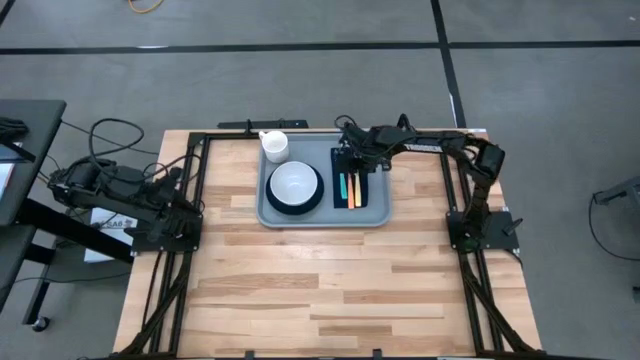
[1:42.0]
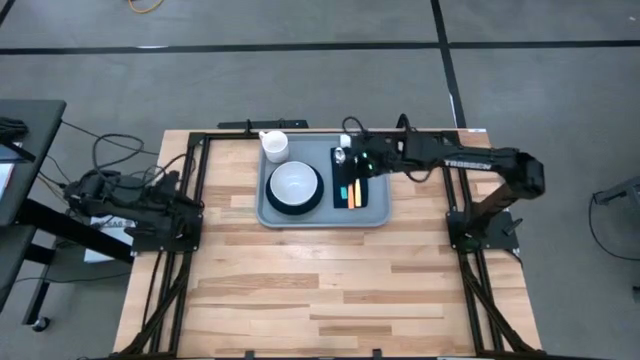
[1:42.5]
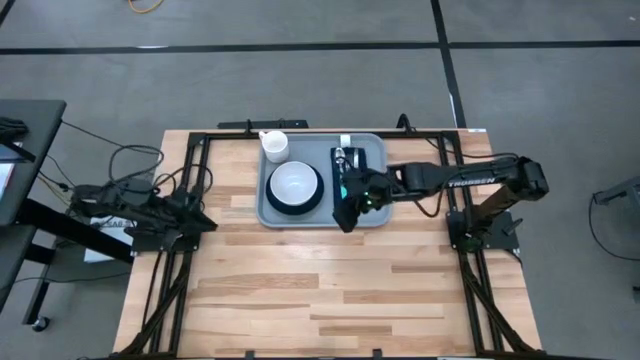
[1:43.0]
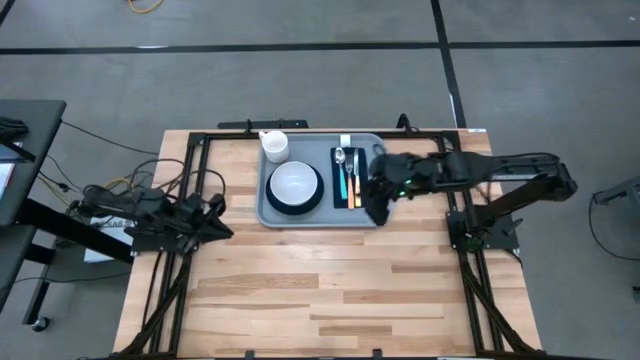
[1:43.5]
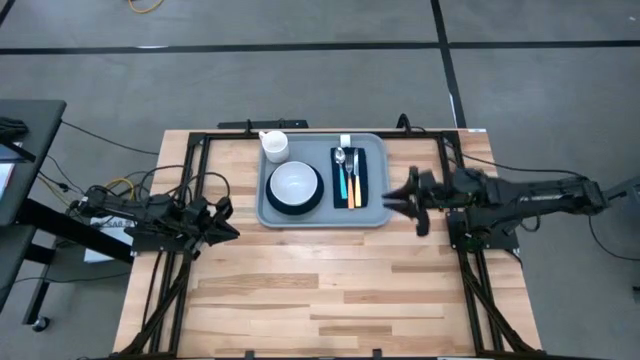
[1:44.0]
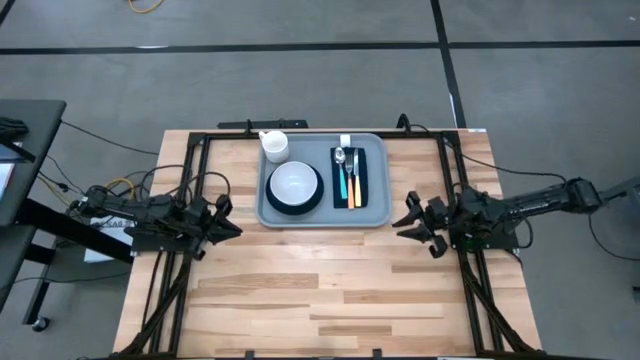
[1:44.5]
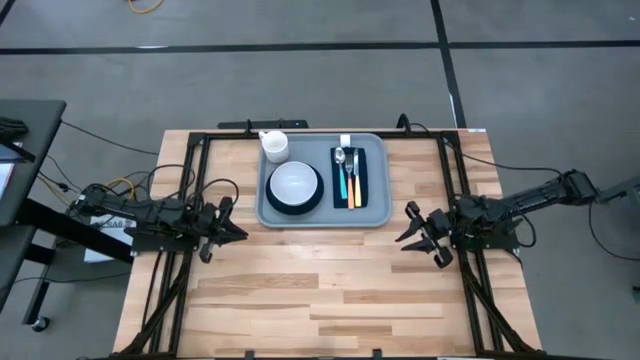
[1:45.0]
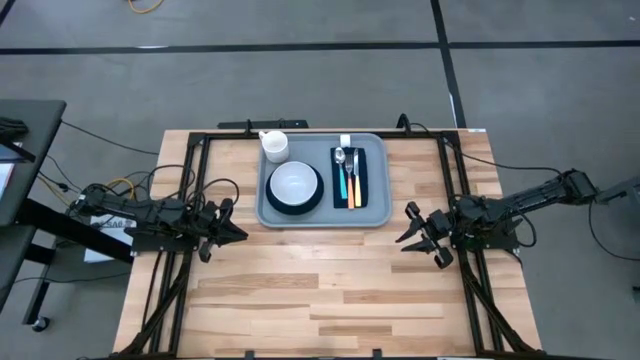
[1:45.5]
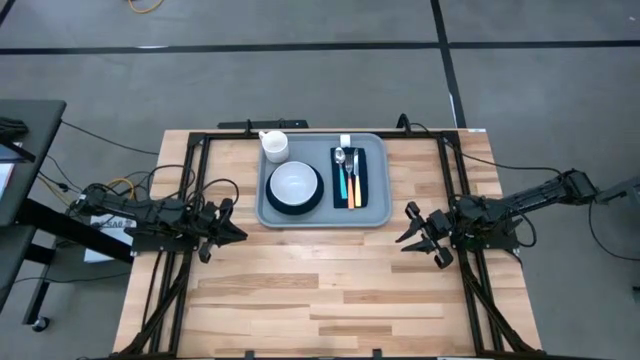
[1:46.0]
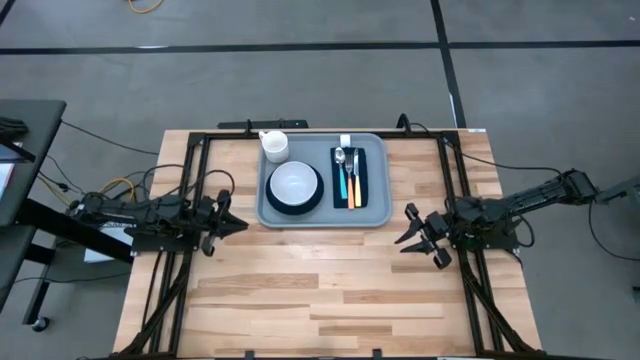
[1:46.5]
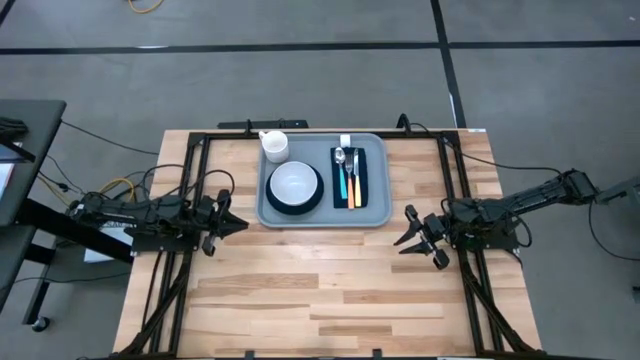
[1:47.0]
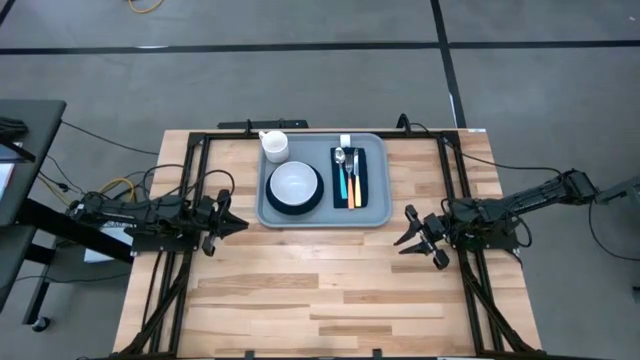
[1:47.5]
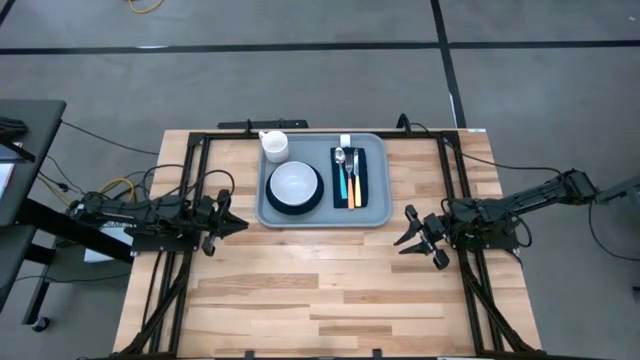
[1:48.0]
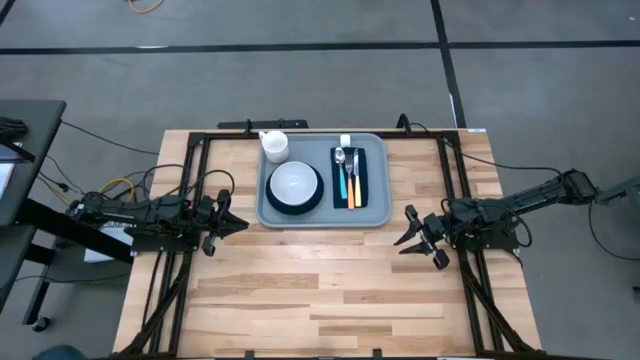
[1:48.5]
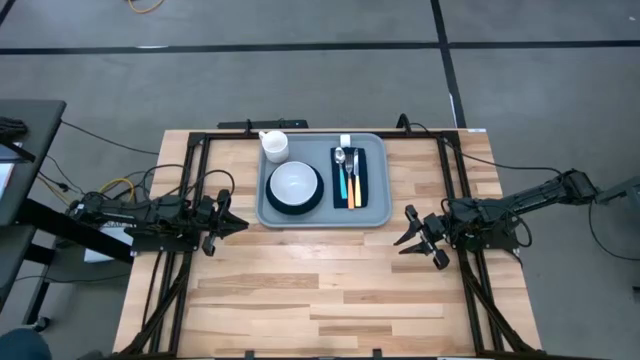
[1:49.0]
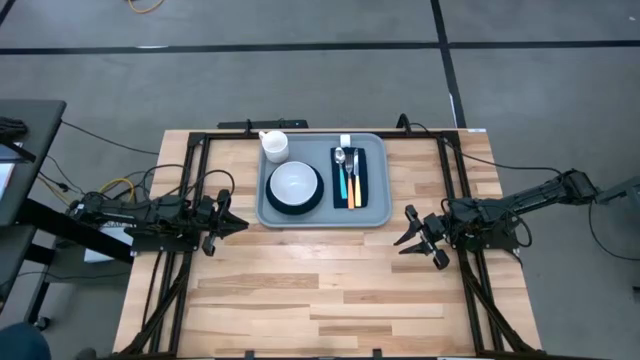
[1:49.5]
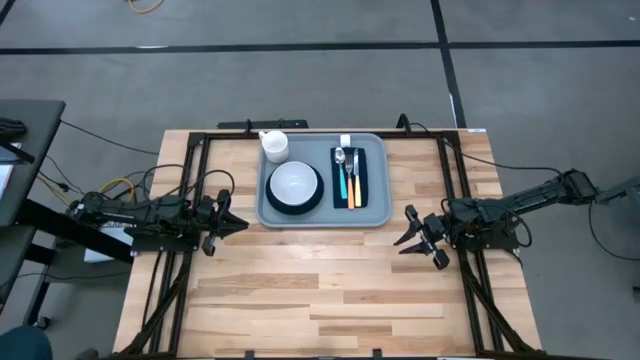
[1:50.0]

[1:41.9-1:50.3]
Task: Set up tray
Return to Home Position

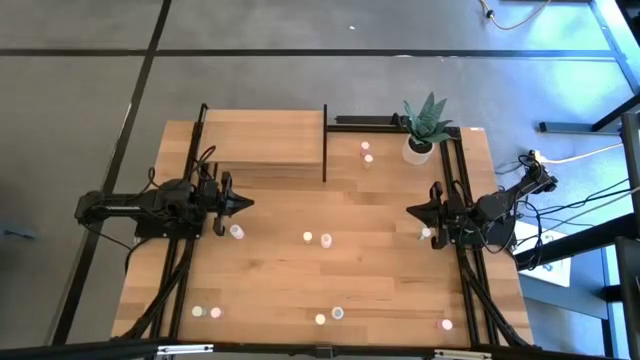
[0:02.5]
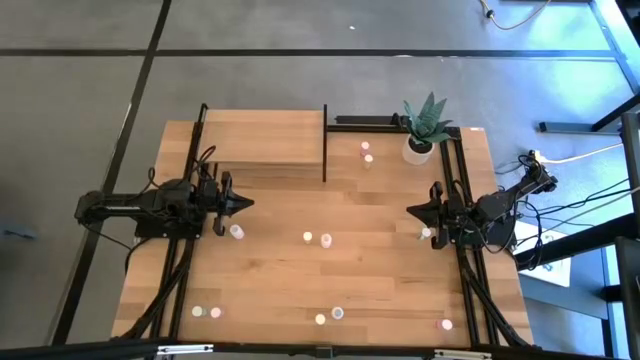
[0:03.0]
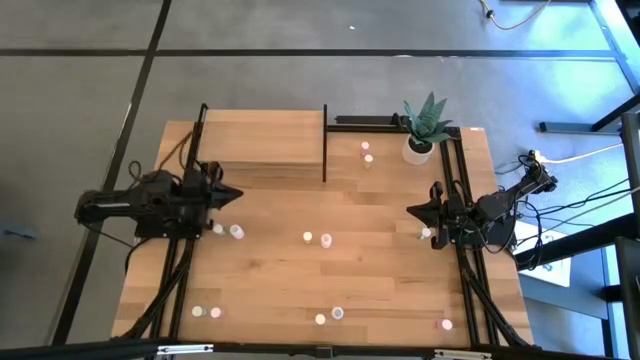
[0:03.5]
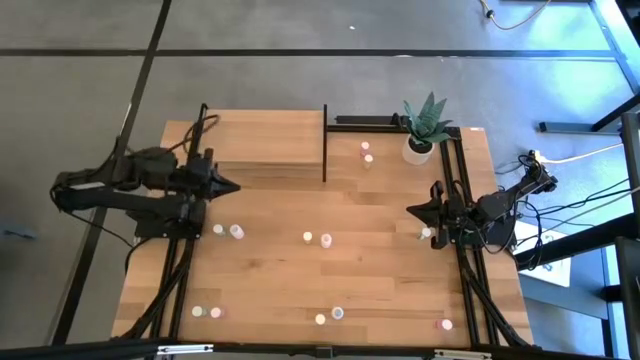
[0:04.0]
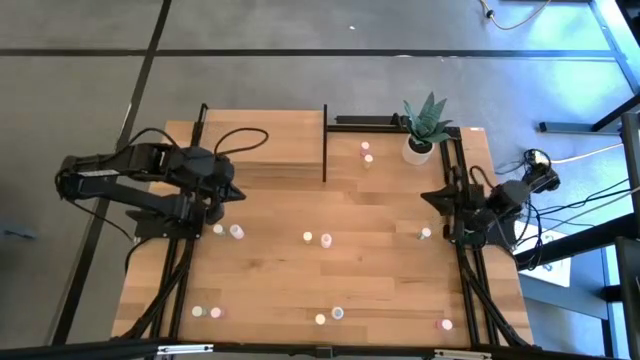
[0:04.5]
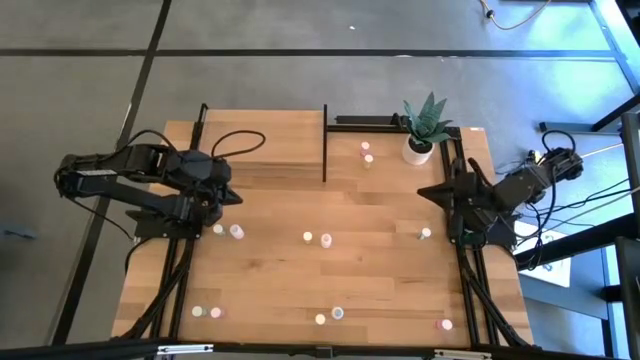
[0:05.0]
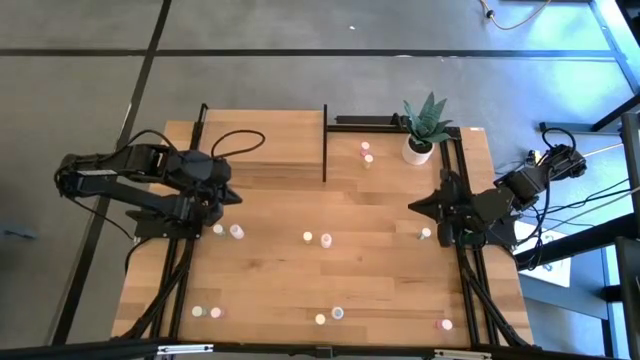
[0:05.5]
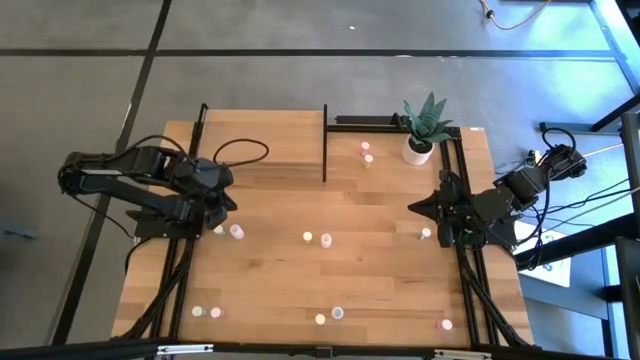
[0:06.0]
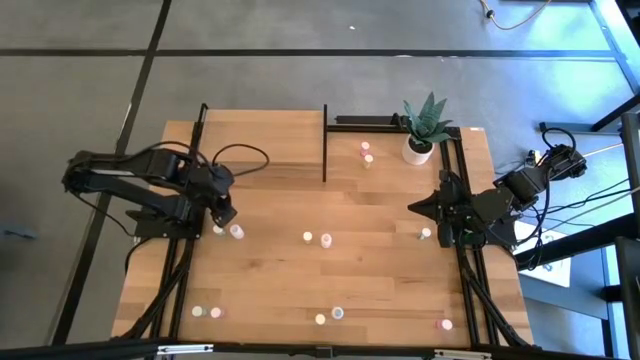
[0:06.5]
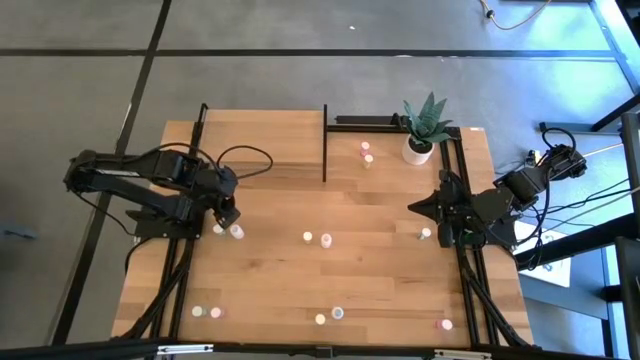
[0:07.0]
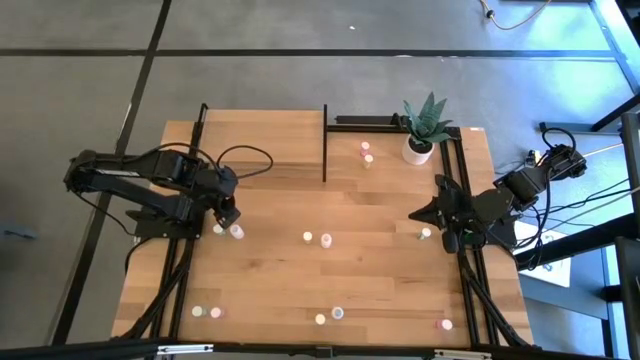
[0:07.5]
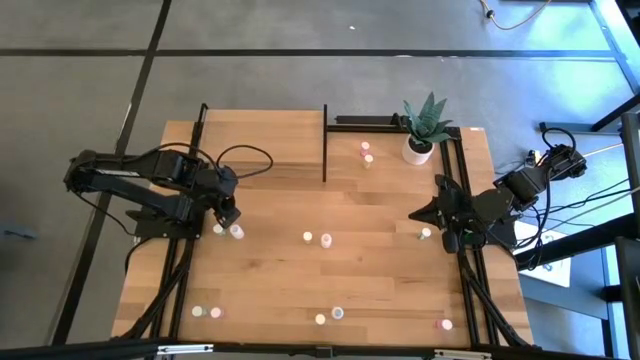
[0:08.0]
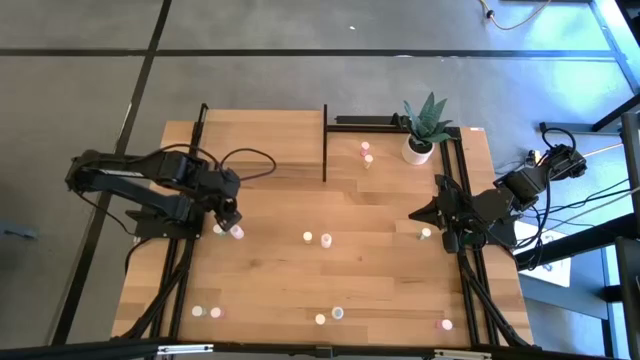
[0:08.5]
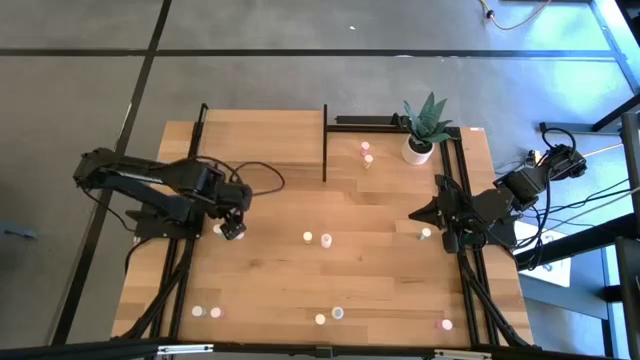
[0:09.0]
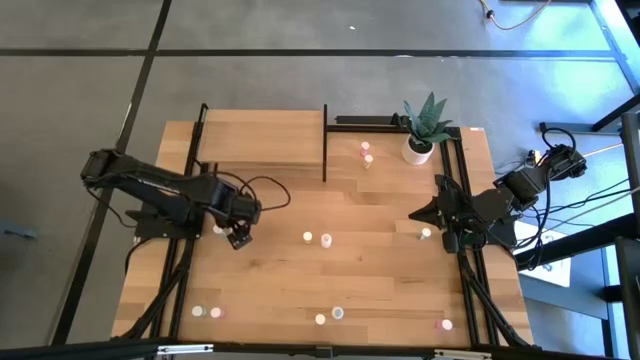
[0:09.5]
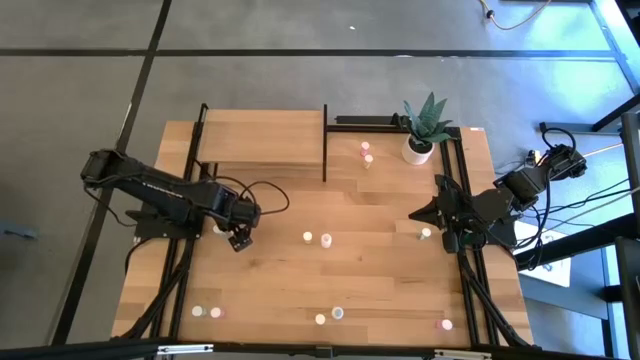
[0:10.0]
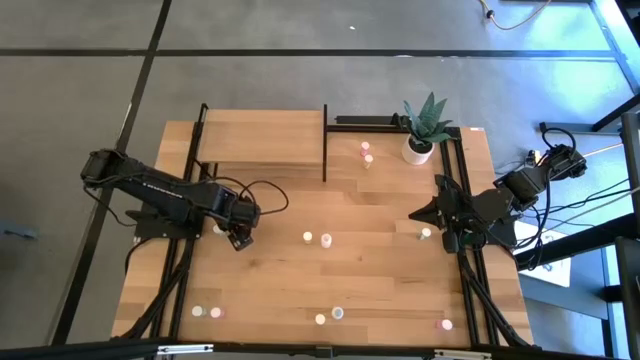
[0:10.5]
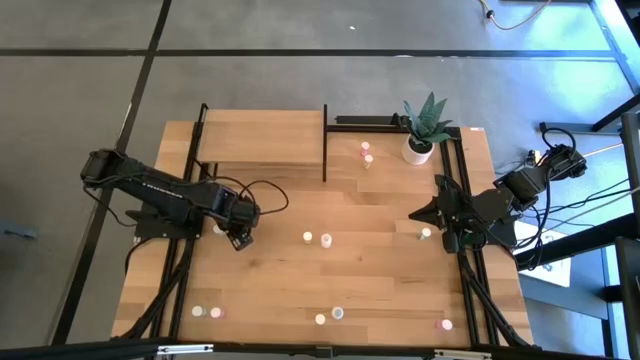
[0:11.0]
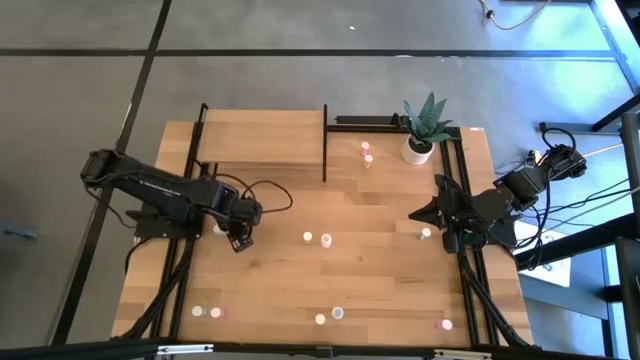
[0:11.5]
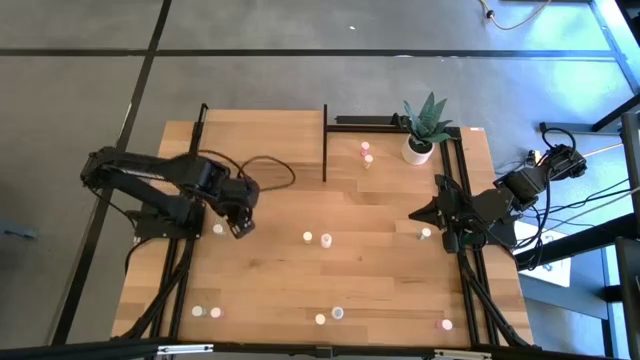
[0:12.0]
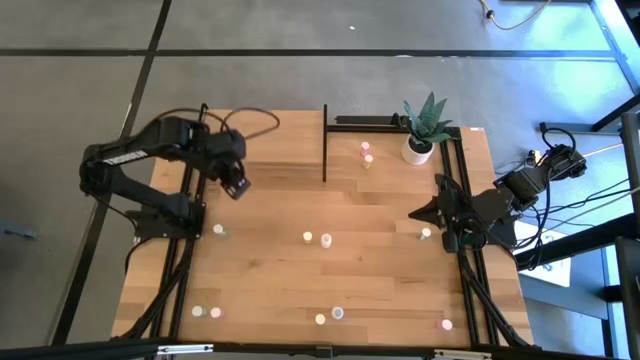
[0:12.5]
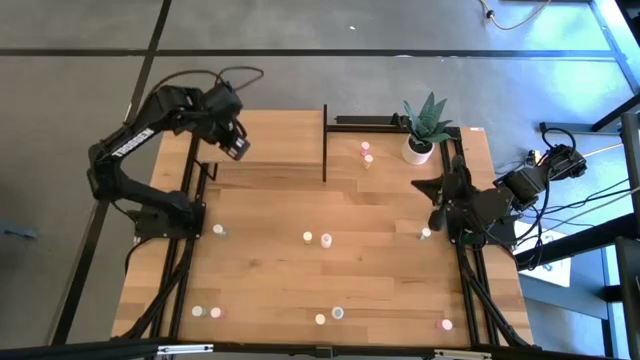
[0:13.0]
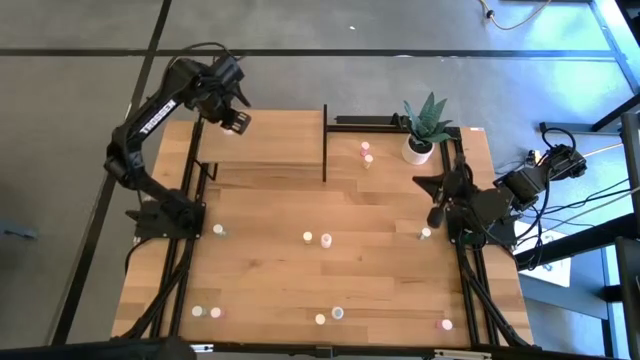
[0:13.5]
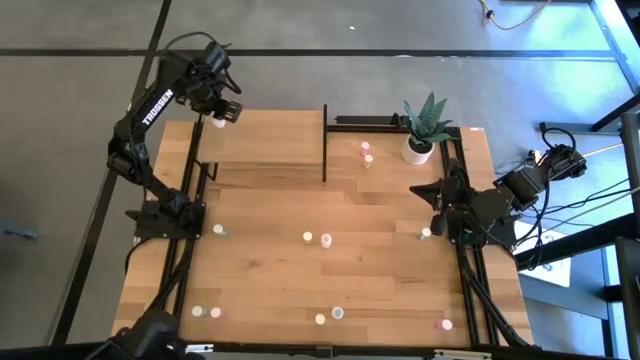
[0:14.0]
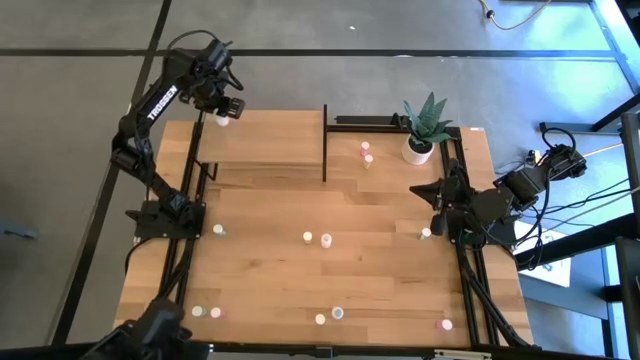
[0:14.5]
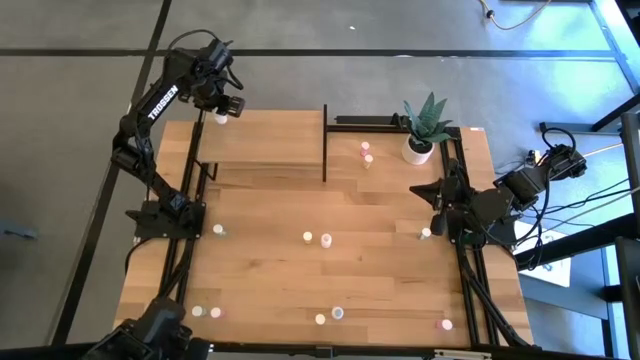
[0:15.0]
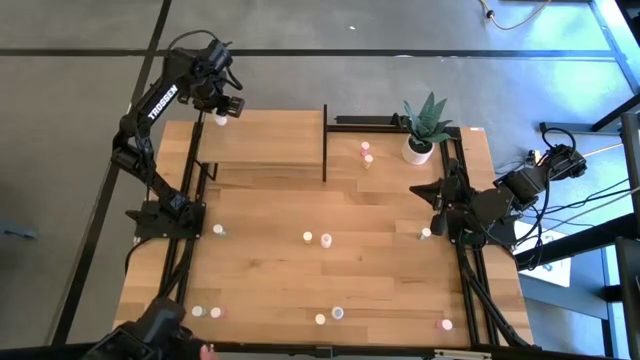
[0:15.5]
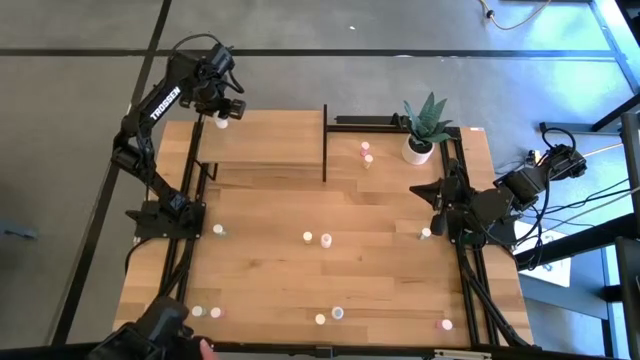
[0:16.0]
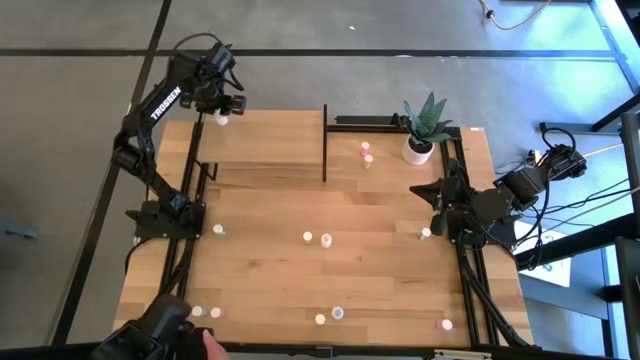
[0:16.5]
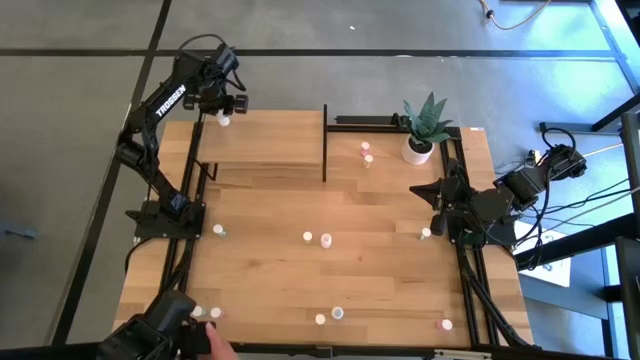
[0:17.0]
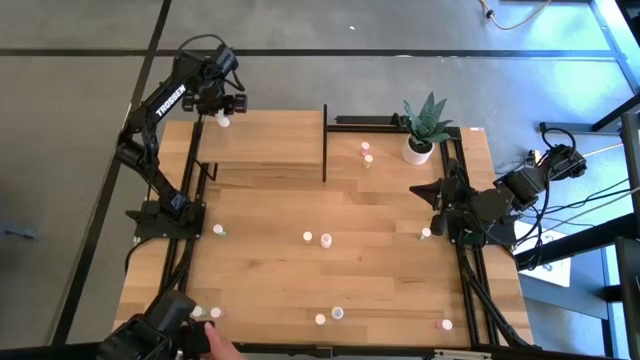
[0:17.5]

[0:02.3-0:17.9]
Task: Pick and place medicine bottles onto shelf by color
Put the top left white pill bottle on the shelf
